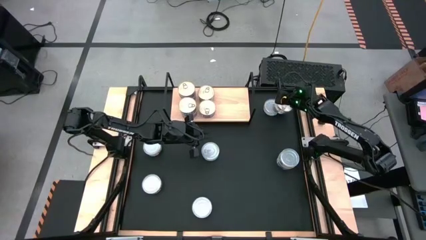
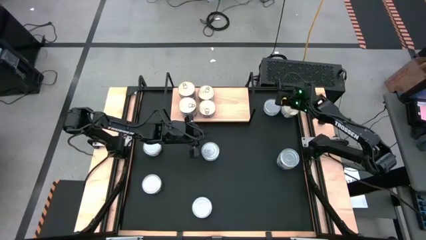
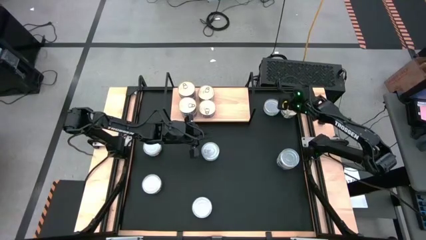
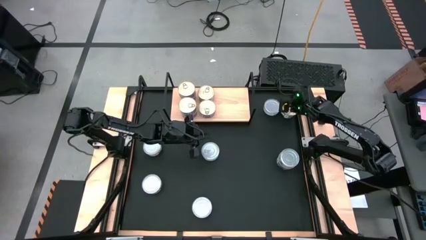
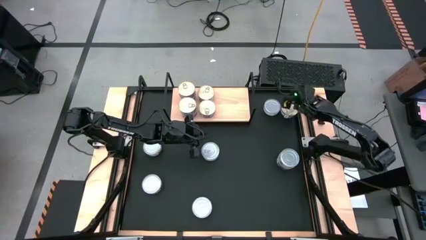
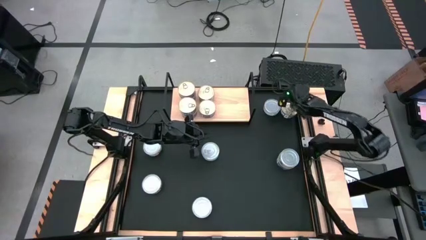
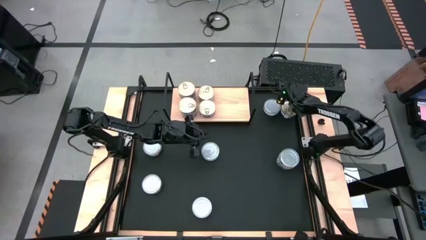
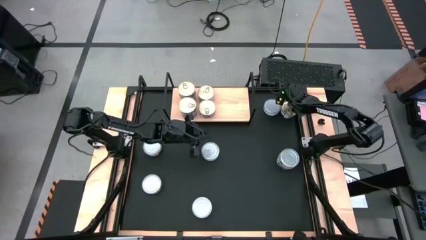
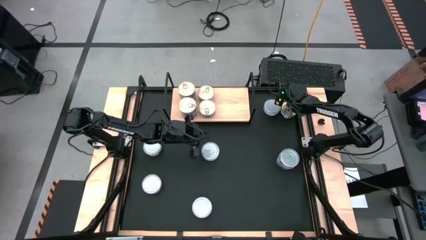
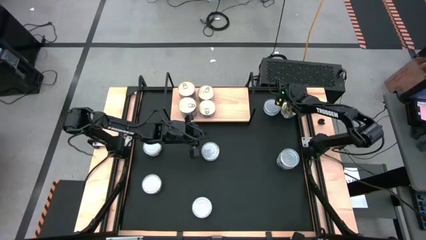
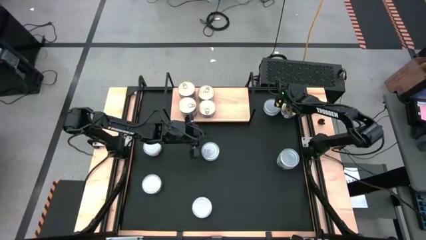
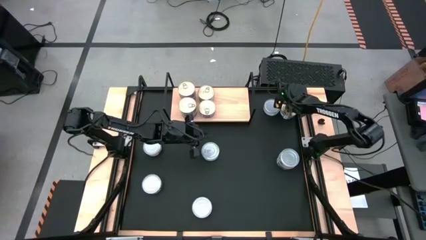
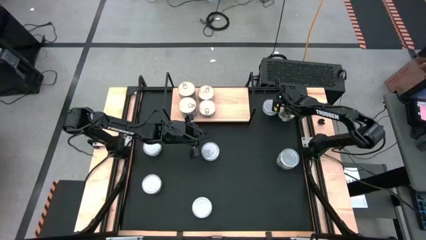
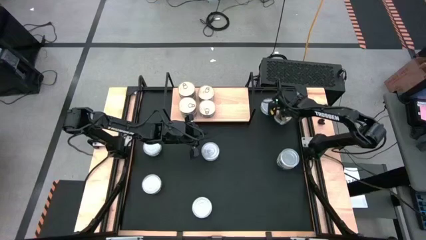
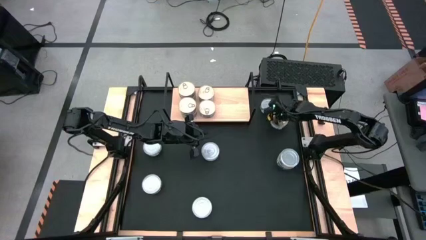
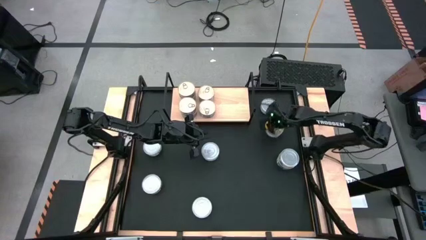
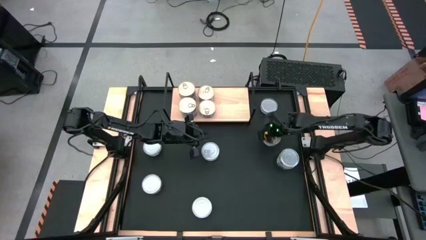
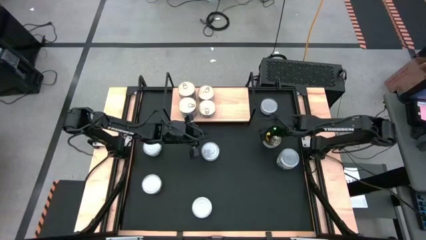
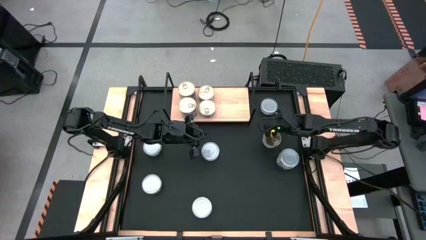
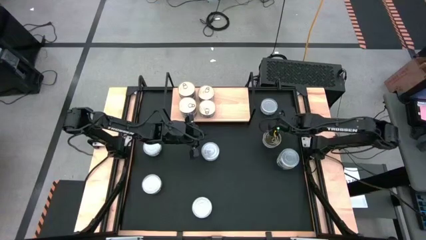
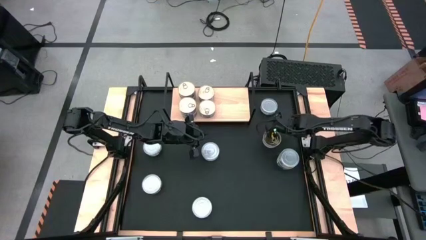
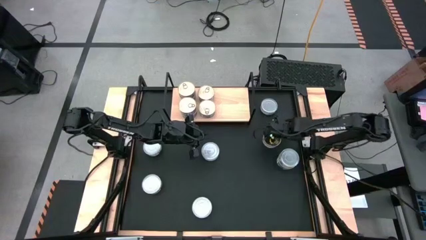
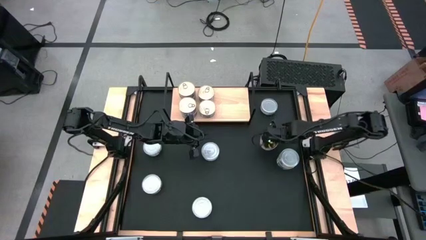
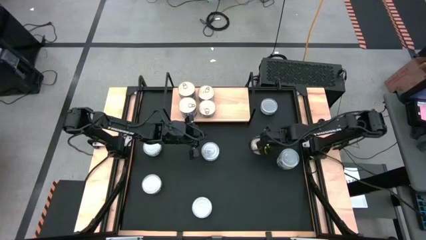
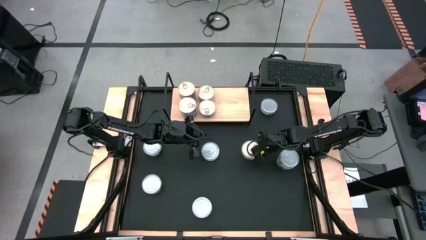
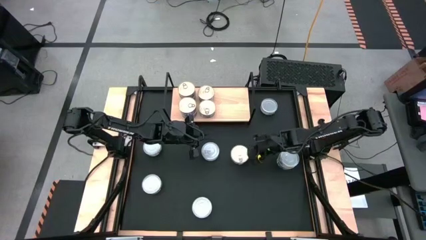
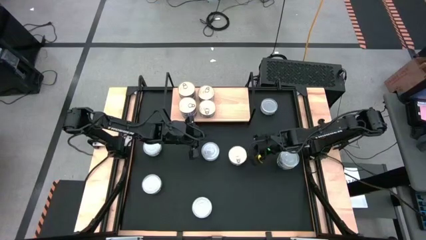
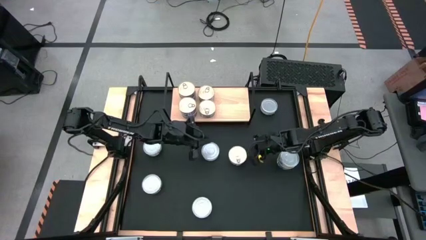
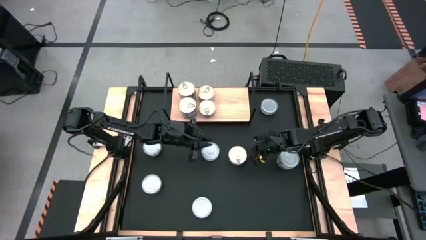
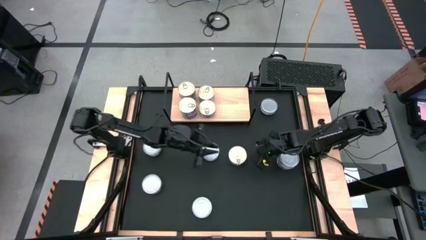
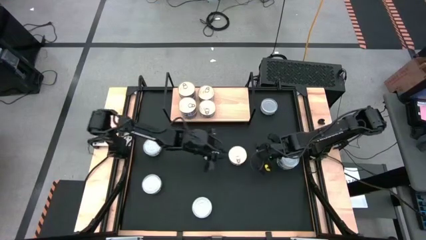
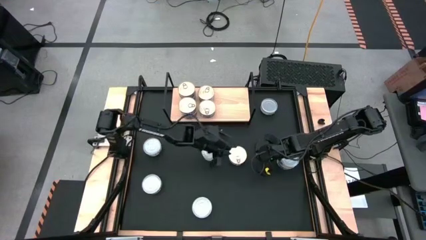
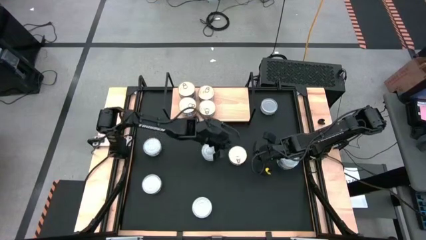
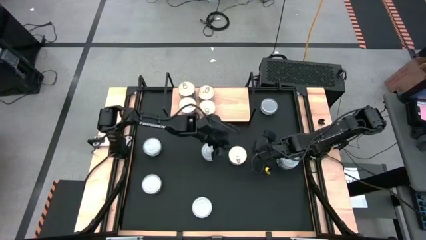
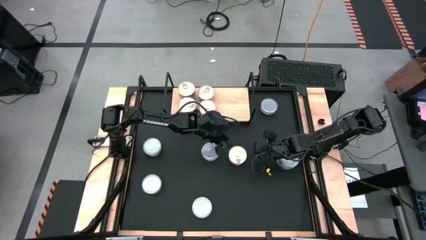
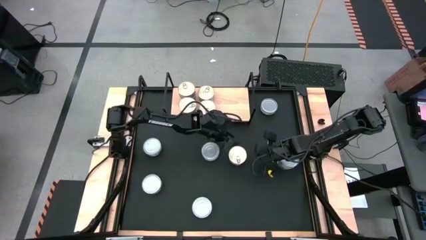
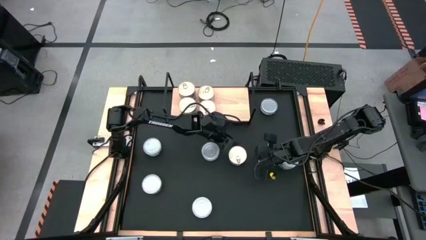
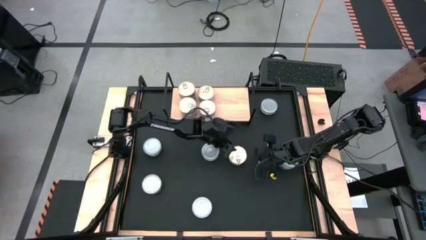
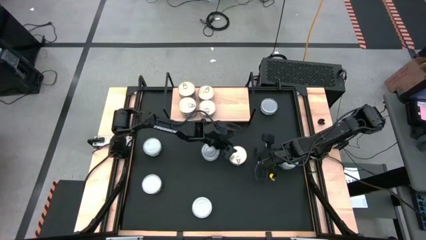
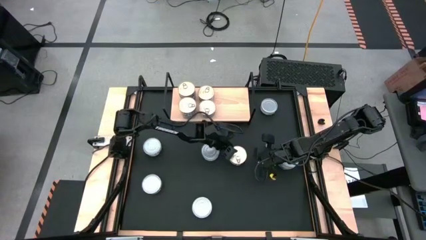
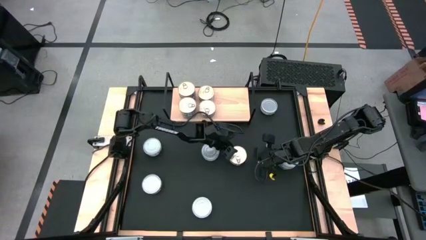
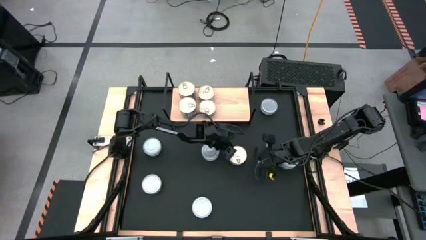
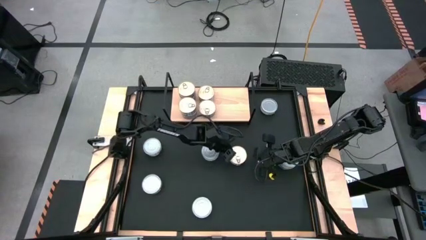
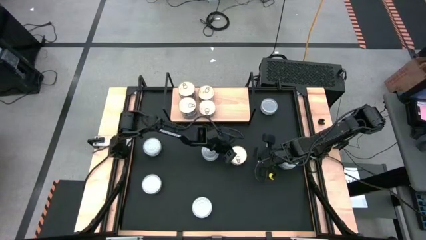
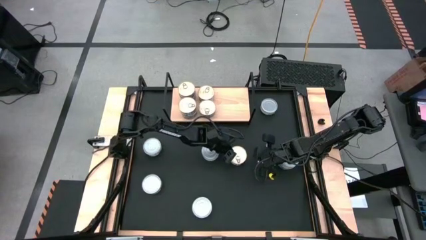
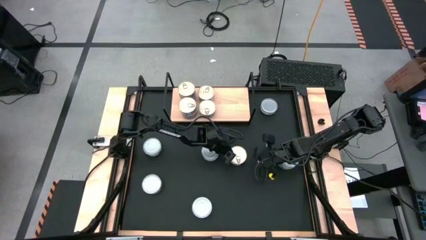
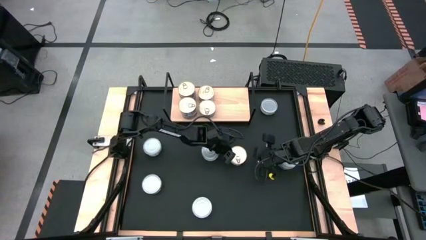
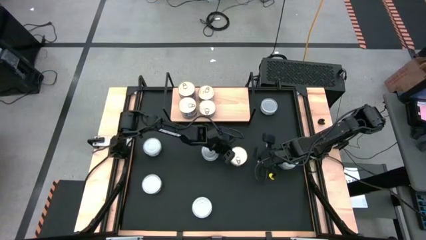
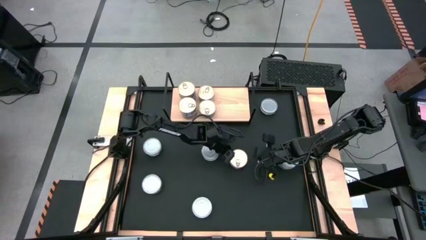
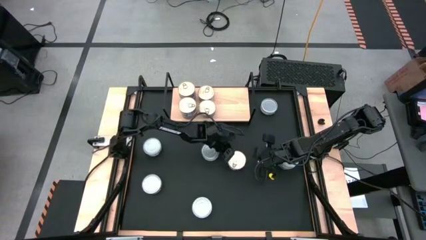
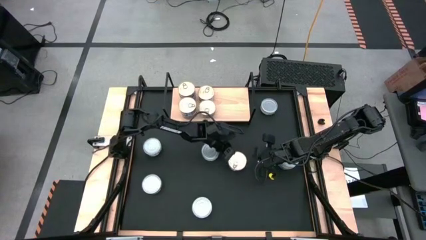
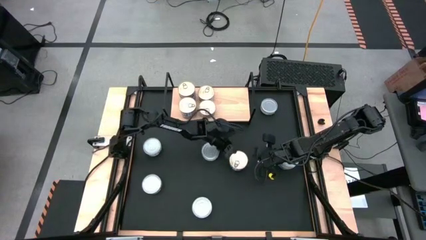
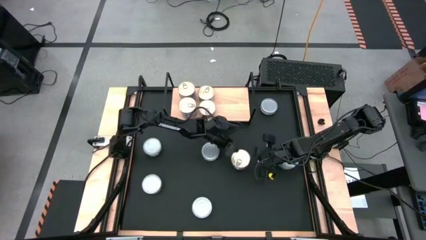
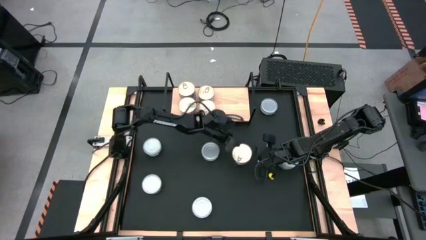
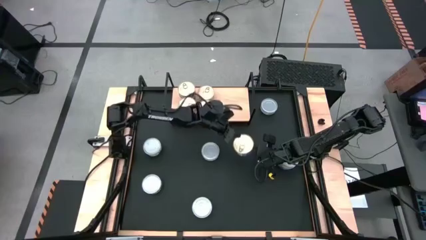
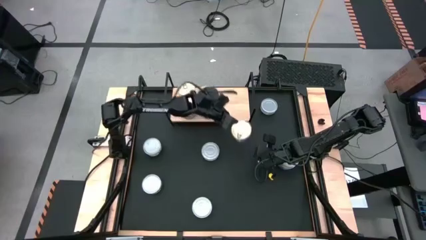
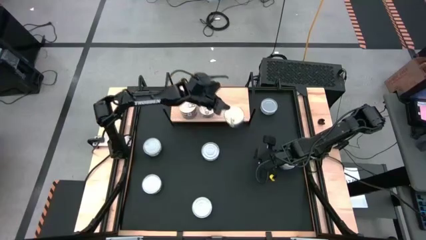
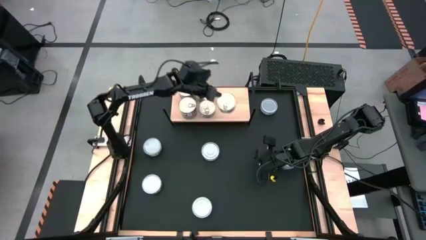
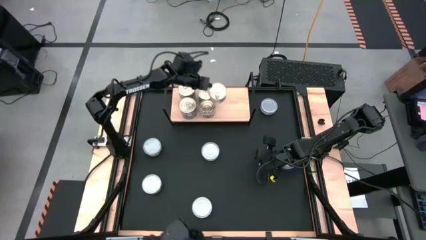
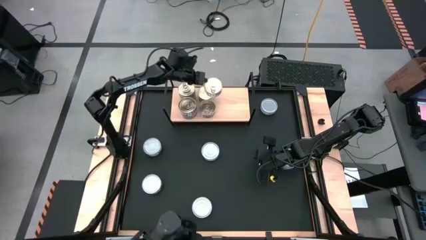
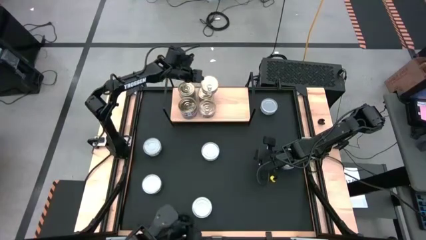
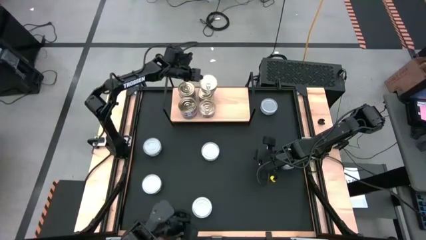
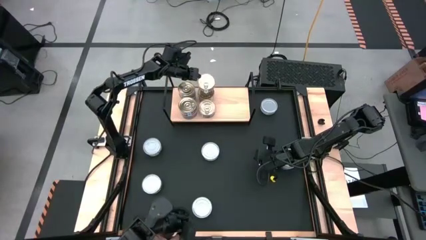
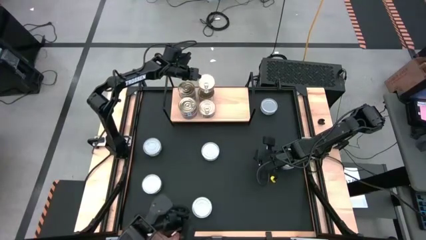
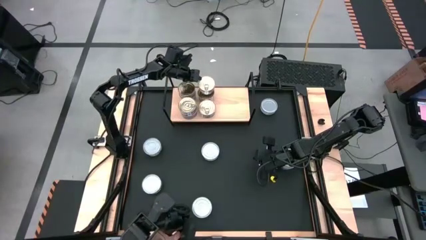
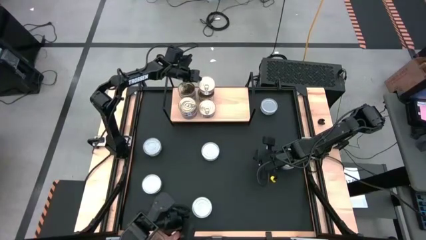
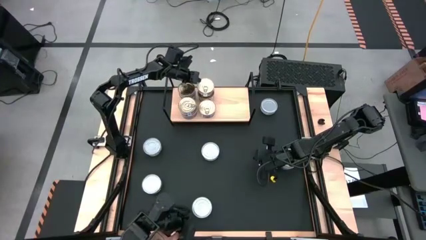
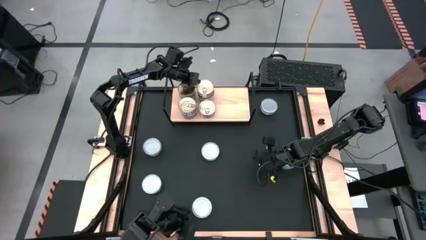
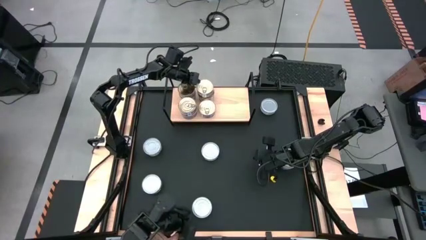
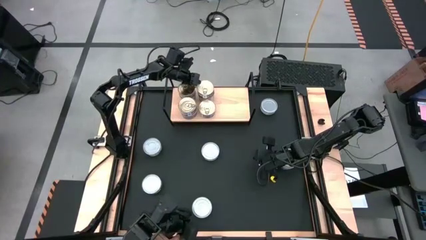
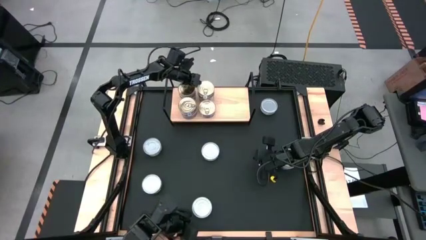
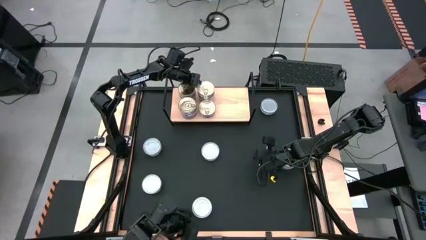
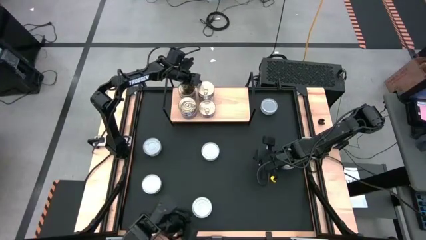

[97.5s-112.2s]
Task: Stack canned seafood by type on shelf
Stack the blue tuna can on top of the blue tuna can on the shelf

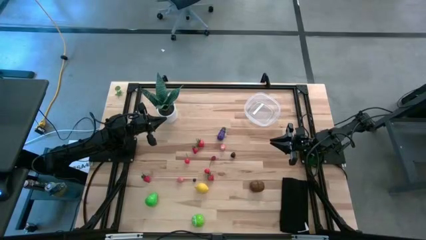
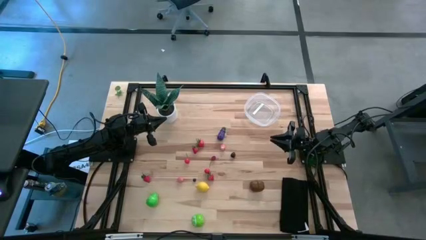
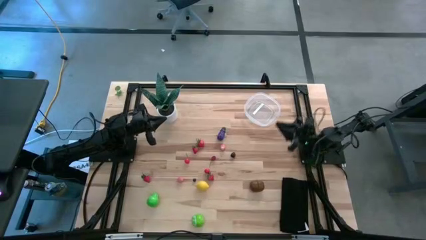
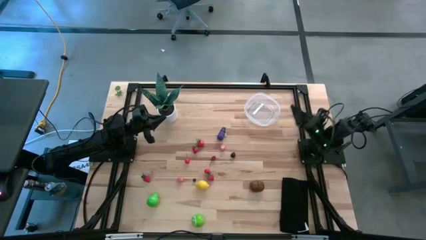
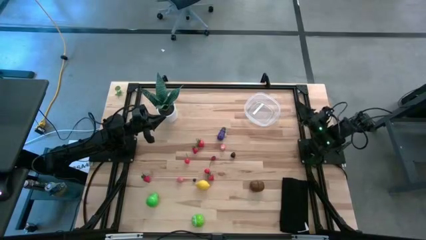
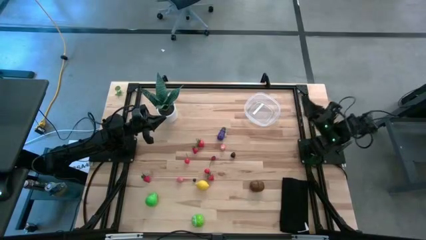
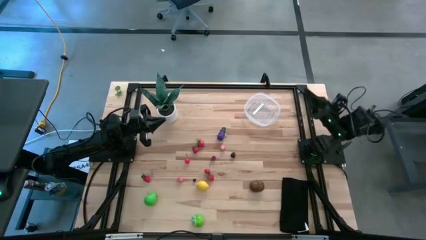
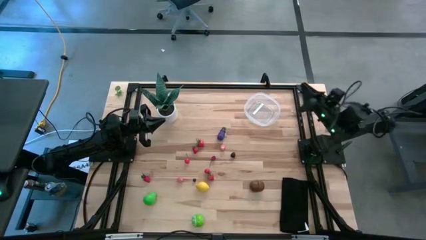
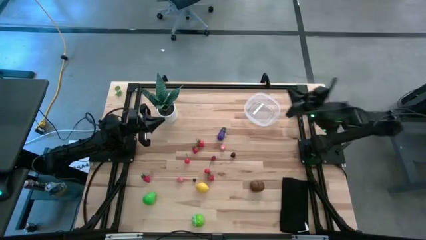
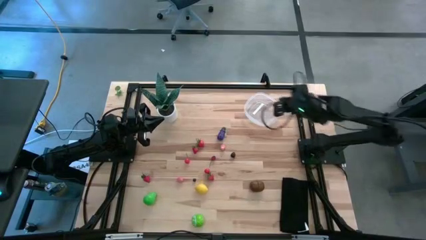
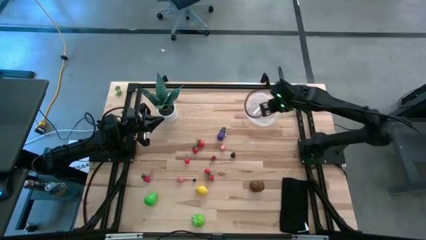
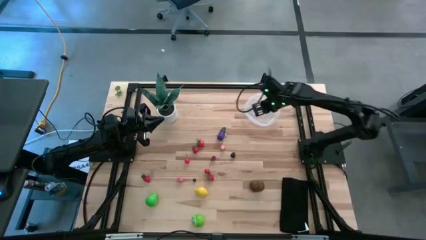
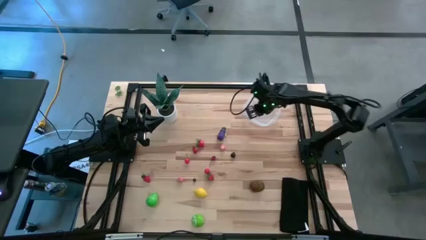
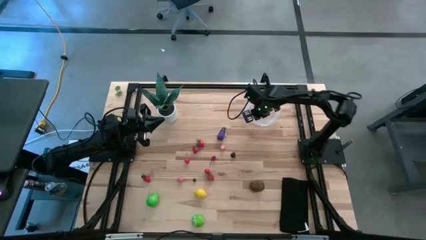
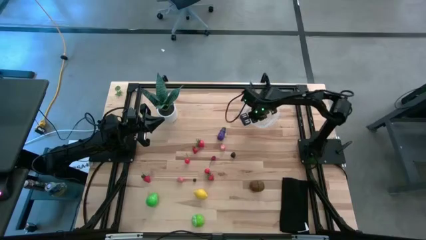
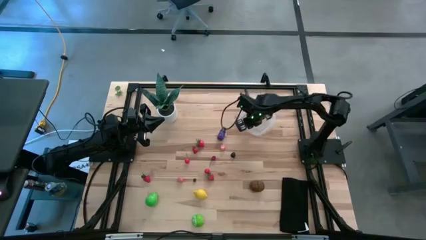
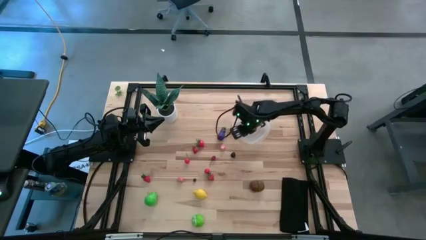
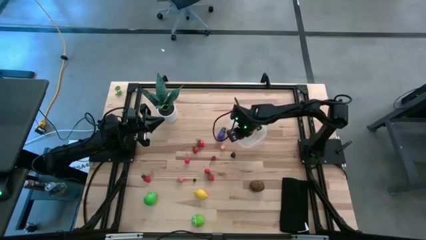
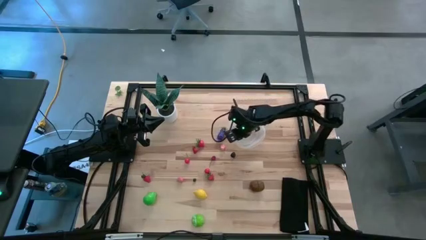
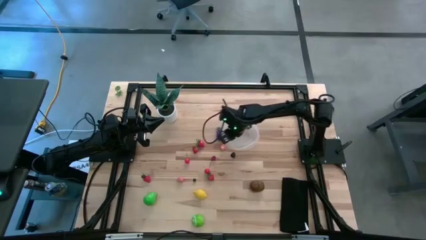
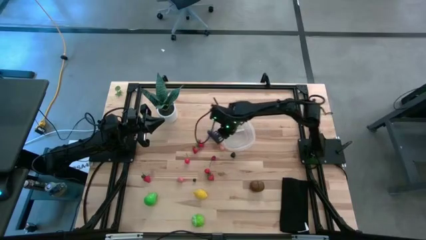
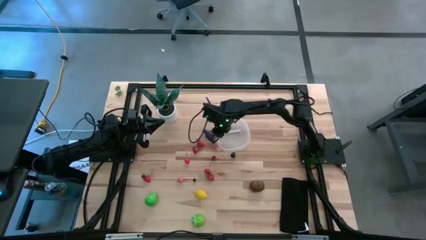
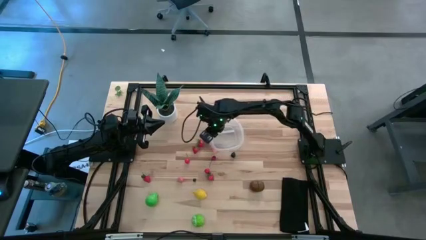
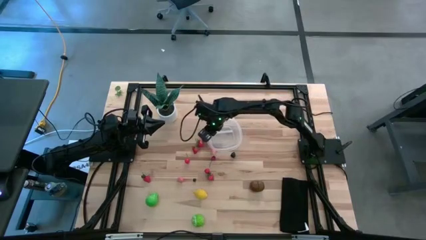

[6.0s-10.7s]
Task: Pick and placing Produce into tupperware
Move the transparent bin to the center of the table
